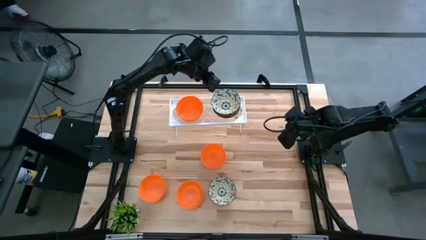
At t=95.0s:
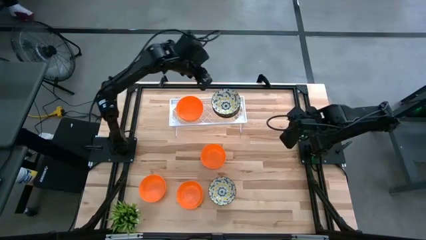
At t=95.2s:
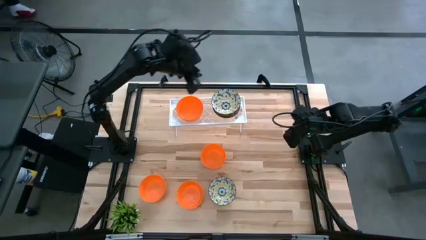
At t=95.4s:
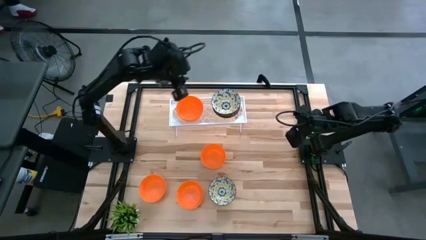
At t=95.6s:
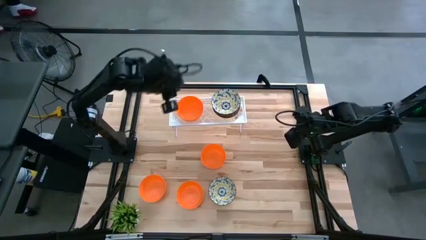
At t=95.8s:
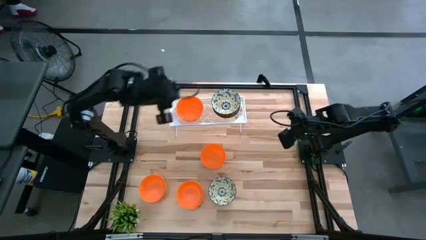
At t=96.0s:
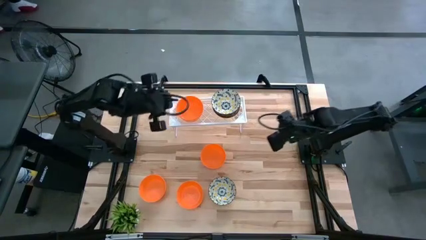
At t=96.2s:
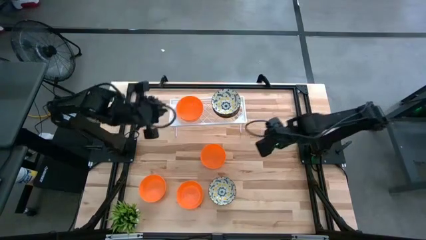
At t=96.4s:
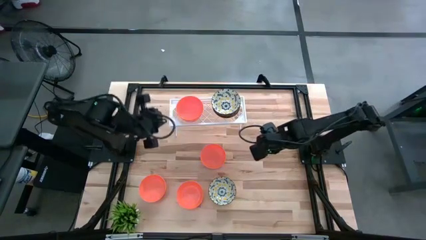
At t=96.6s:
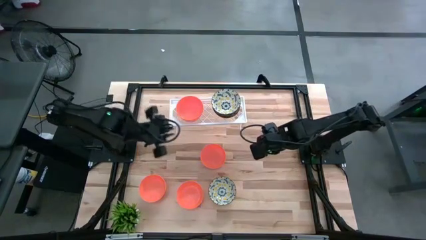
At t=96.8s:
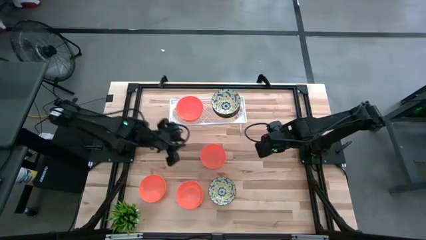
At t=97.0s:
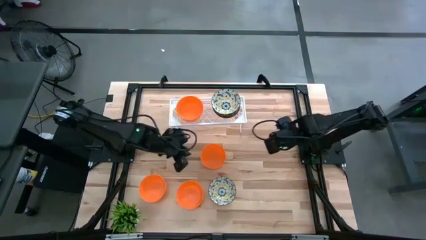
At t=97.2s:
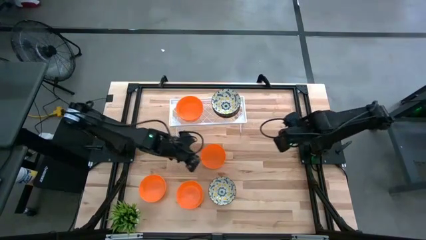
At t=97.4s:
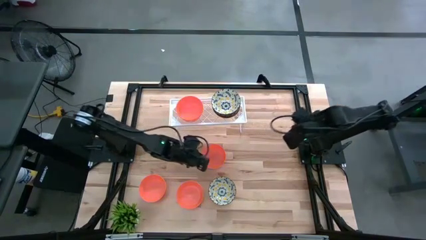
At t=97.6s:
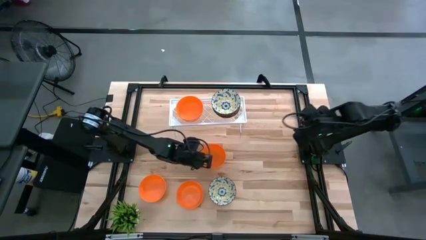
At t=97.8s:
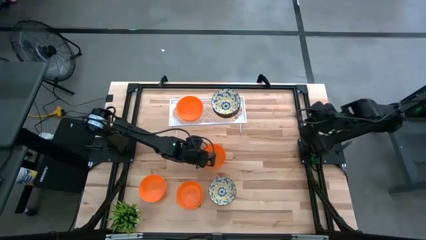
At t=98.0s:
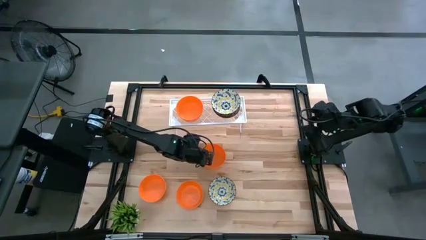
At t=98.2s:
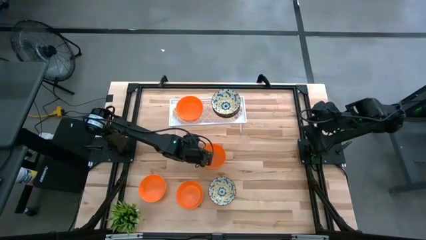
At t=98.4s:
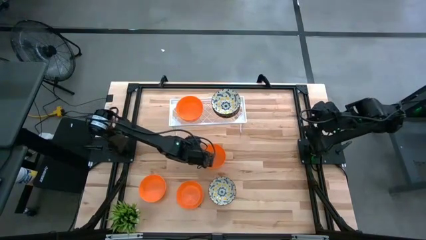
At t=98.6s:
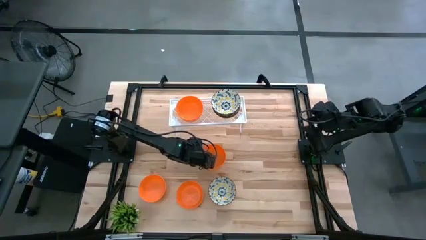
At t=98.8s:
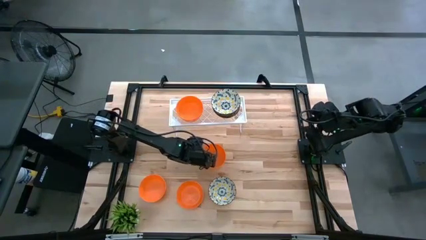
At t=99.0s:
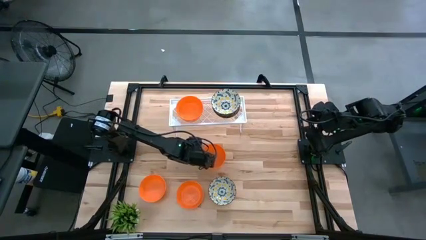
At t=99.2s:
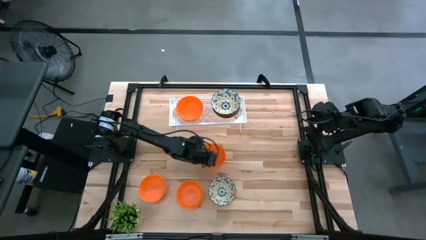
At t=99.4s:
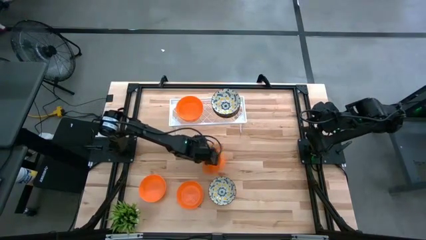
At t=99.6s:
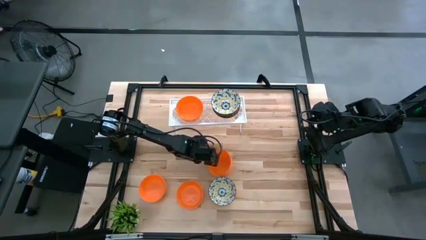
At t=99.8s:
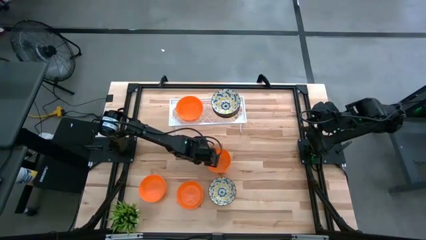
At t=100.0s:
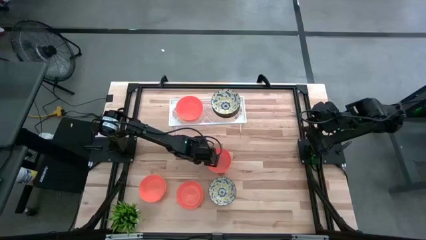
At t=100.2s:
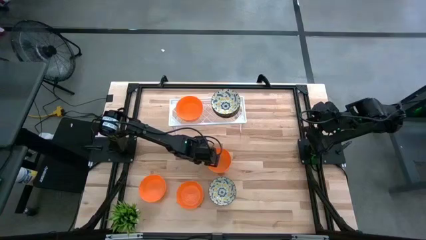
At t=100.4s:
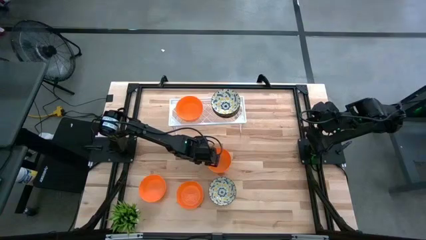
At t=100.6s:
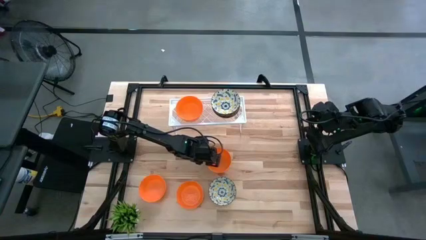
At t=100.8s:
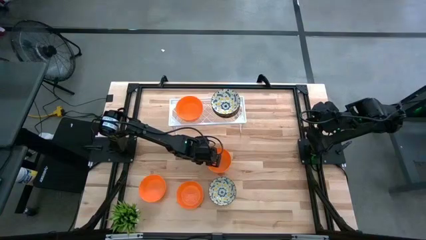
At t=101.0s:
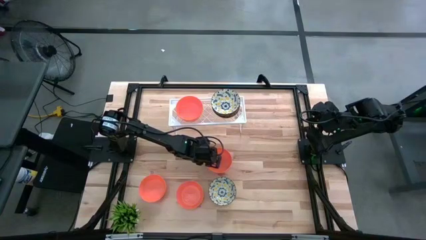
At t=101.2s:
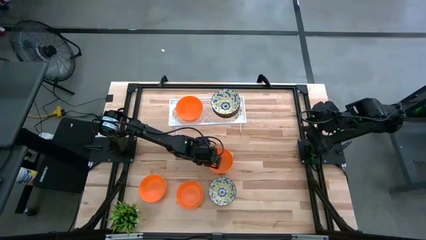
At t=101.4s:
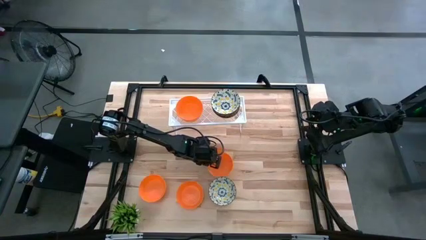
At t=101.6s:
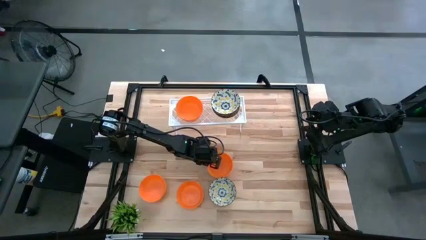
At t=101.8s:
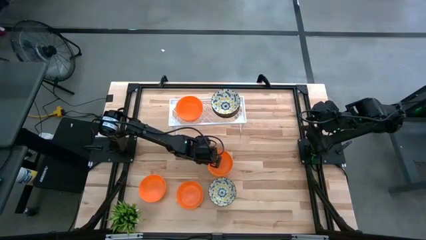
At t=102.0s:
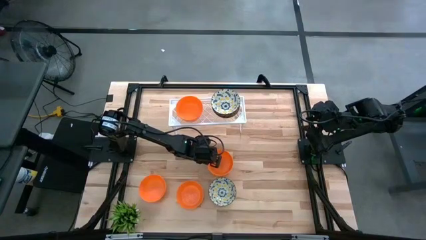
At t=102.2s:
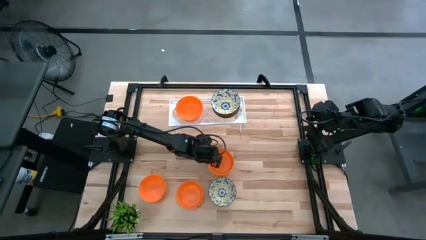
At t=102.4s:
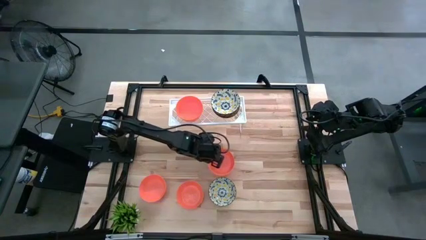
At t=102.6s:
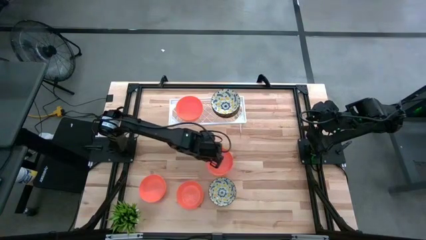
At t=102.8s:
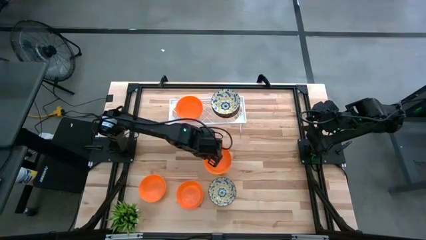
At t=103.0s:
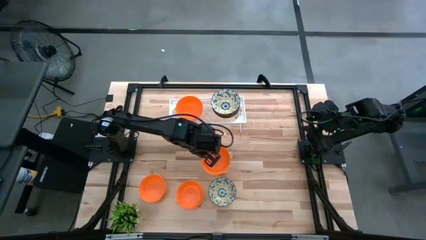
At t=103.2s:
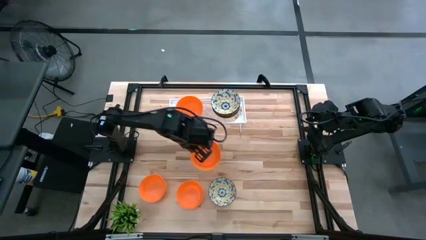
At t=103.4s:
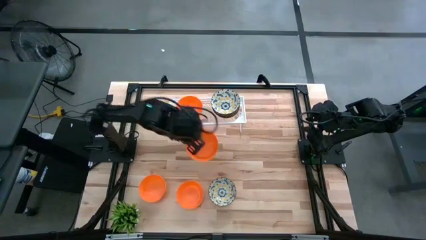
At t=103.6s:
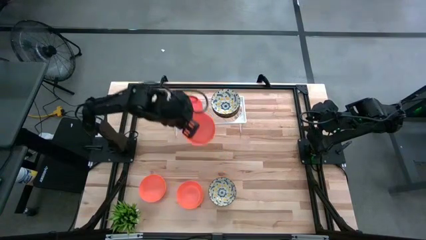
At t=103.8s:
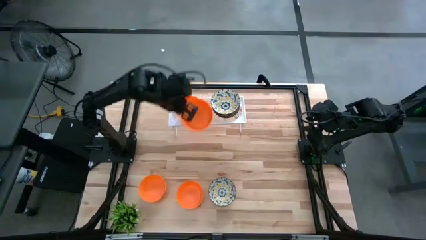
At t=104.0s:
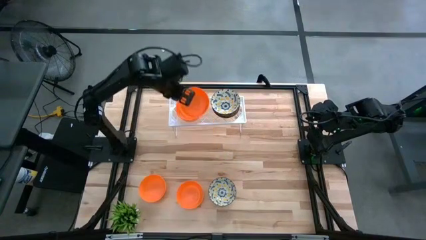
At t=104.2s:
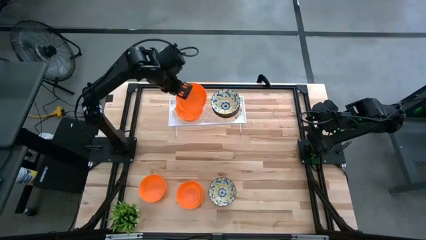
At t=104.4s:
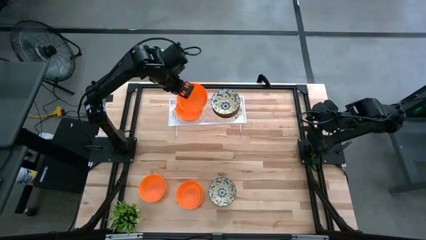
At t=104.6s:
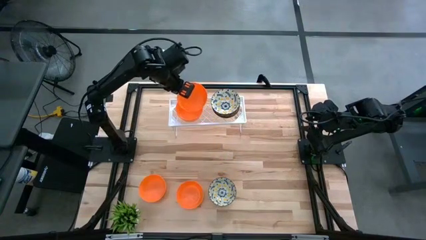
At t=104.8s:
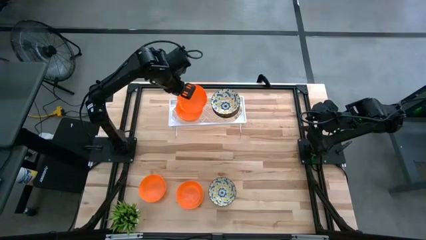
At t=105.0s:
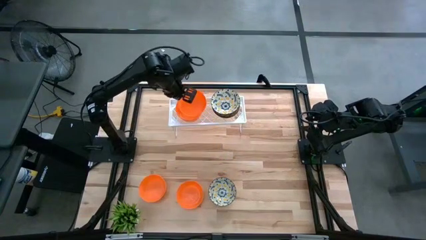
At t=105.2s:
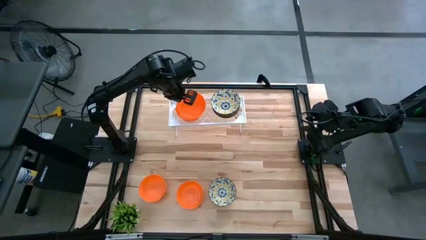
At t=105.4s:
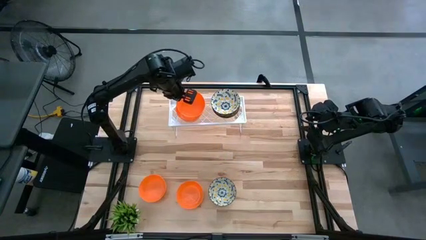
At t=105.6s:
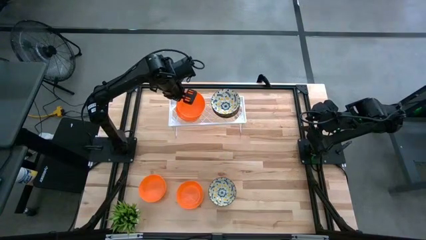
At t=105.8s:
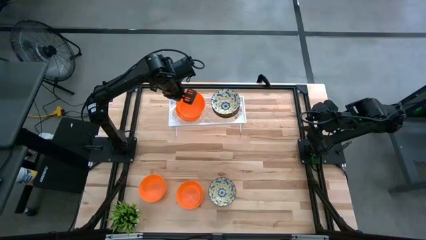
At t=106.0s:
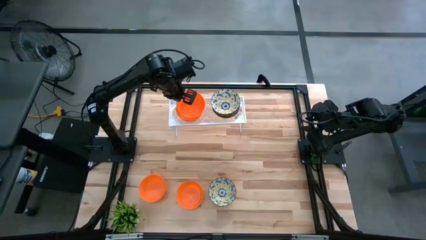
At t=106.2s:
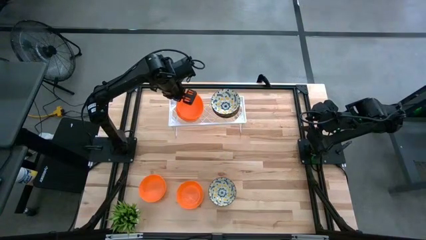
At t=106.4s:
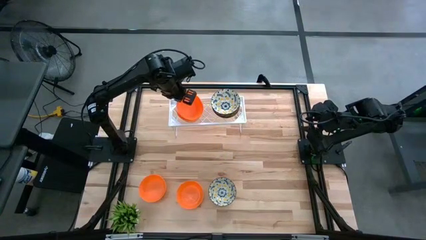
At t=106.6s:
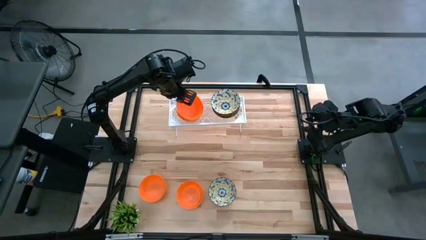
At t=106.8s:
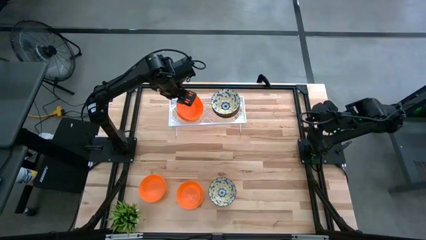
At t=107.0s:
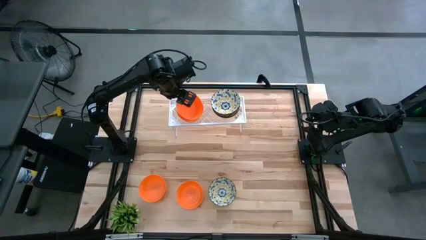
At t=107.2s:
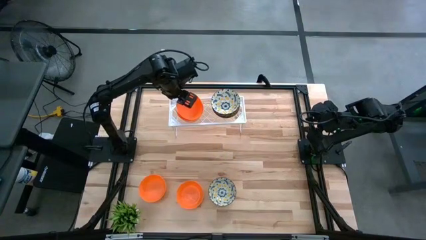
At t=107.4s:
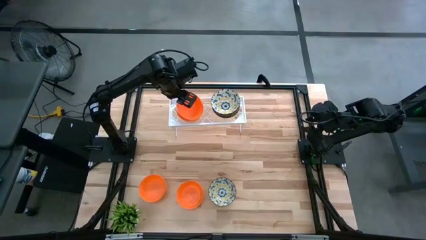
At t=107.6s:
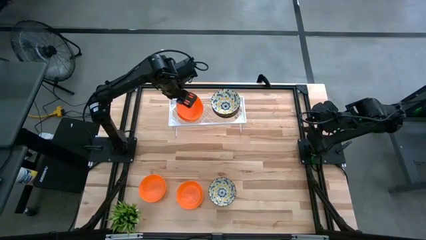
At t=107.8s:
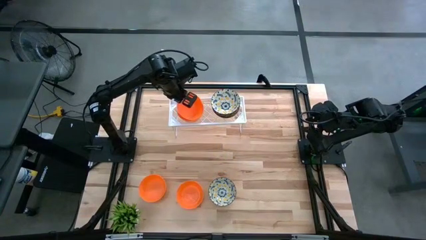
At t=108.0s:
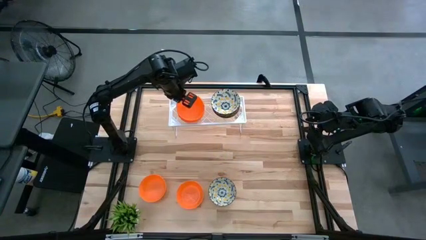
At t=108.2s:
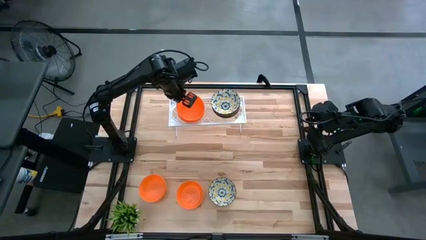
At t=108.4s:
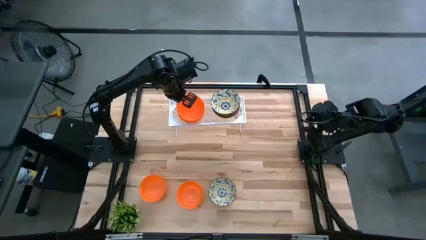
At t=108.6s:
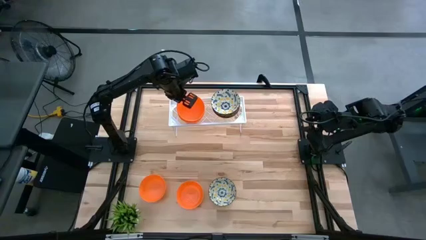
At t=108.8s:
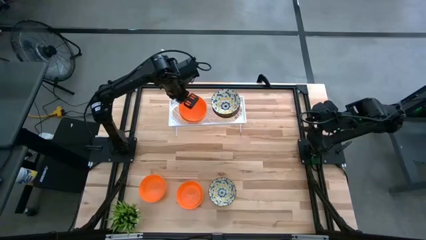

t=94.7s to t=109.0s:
Task: Pick & Place Mini bowls
Stack the orange bowl on the other orange bowls on the shelf
